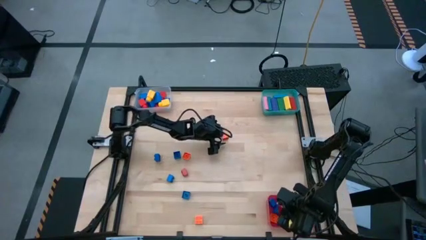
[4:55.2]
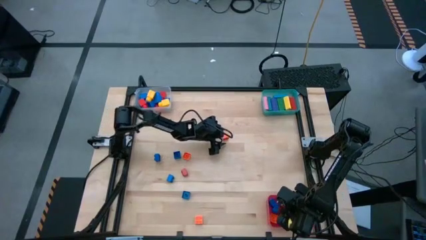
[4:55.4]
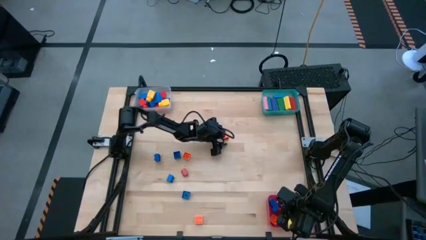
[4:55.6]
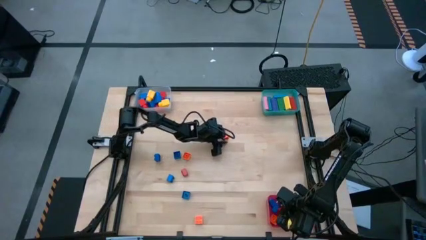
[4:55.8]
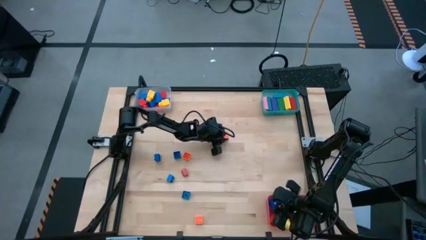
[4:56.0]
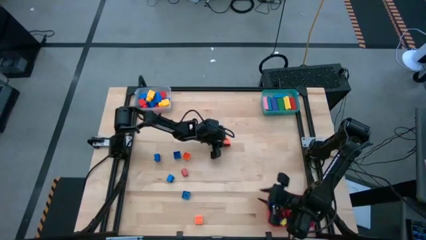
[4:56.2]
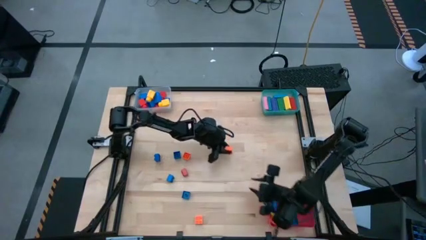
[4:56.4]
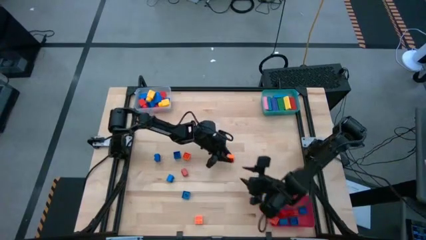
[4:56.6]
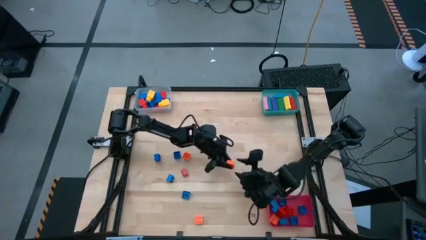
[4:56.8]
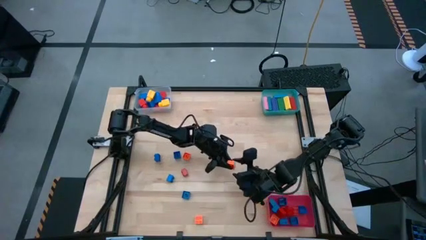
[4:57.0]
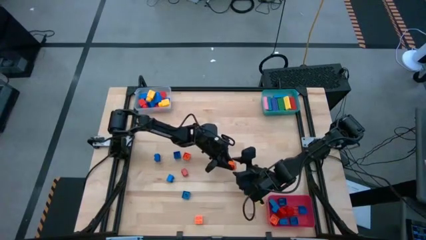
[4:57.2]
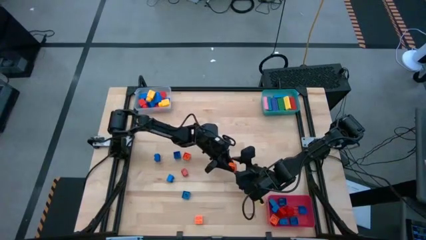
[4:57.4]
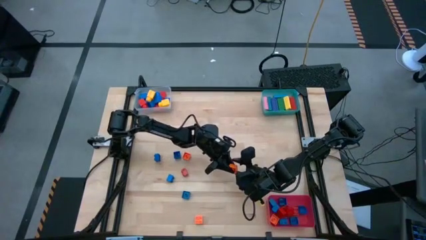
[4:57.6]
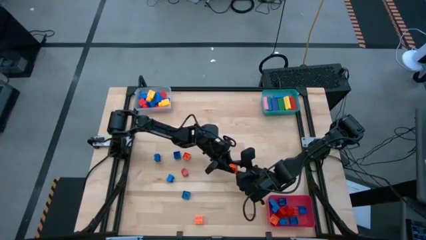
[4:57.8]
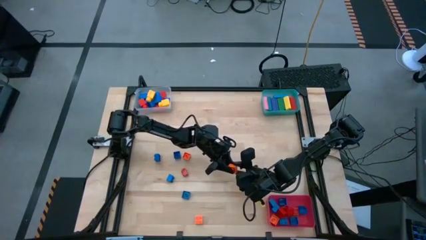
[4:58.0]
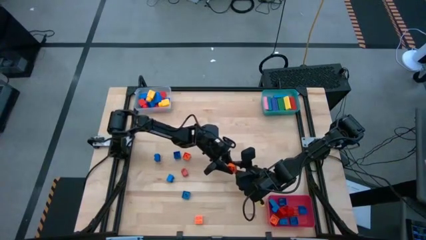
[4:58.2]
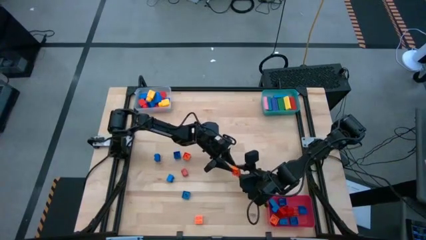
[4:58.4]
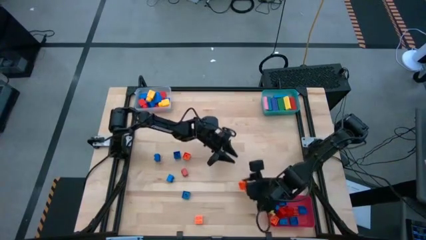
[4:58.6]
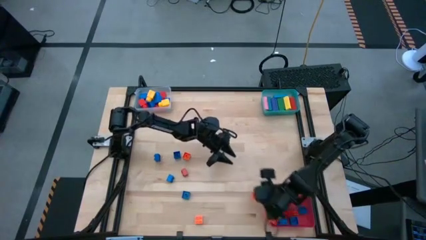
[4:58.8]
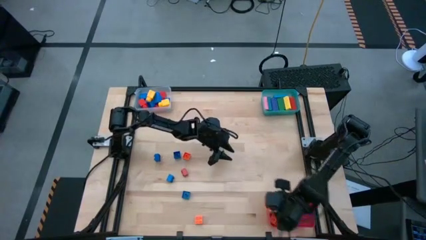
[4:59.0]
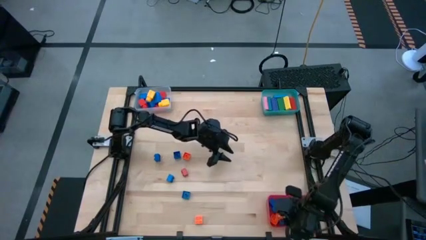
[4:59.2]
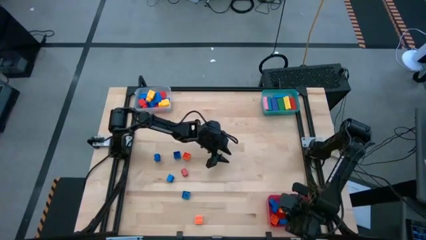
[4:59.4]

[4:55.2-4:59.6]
Task: Sort blocks by size
Put the small blue game piece into the red bin

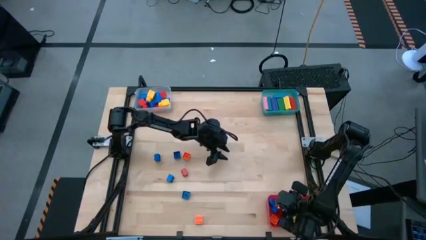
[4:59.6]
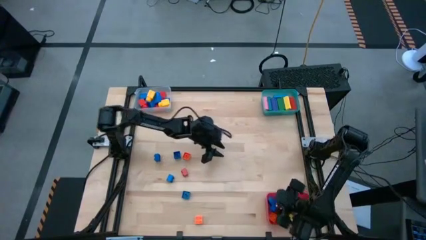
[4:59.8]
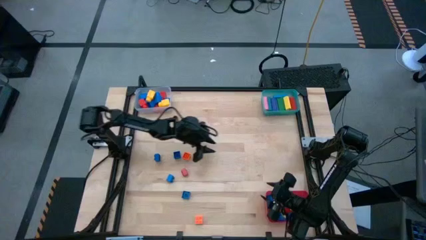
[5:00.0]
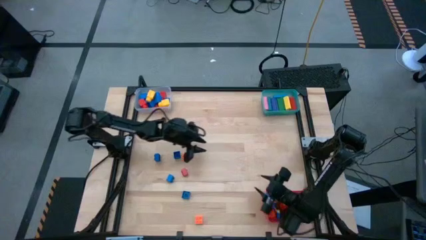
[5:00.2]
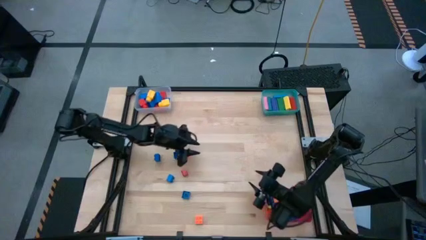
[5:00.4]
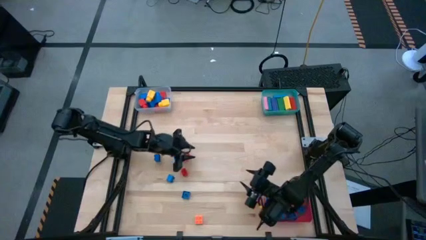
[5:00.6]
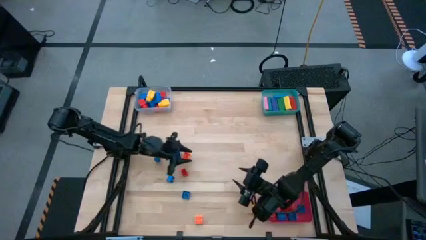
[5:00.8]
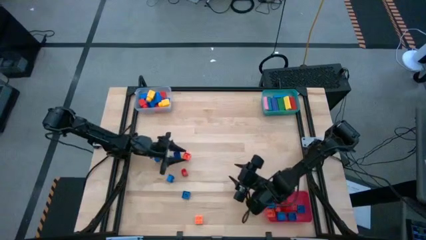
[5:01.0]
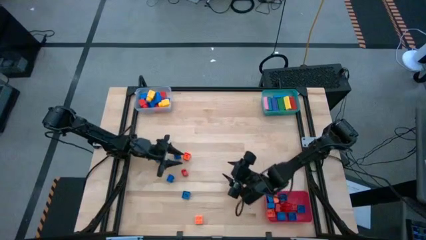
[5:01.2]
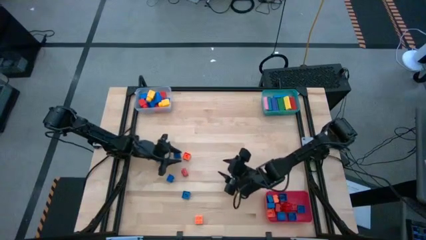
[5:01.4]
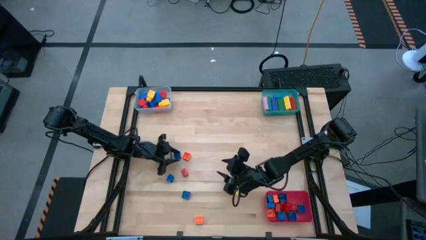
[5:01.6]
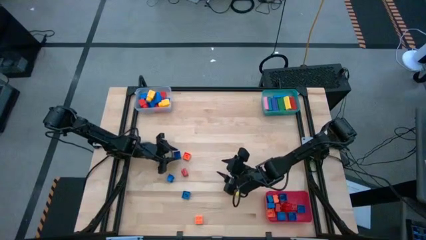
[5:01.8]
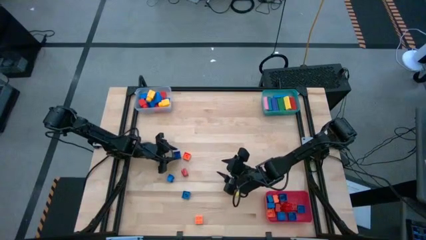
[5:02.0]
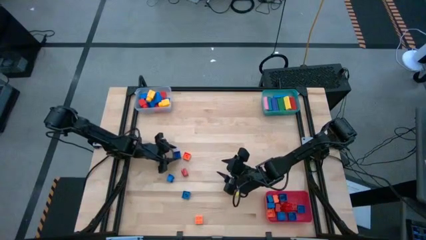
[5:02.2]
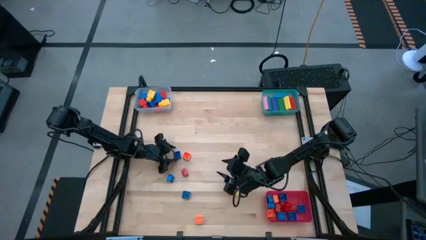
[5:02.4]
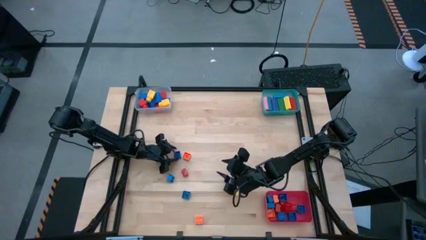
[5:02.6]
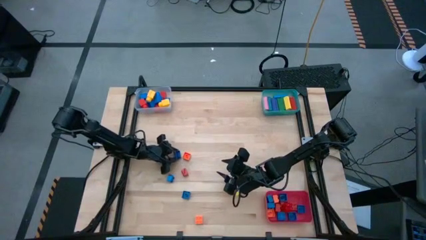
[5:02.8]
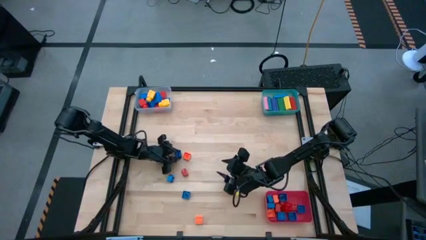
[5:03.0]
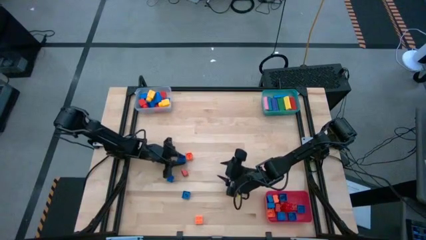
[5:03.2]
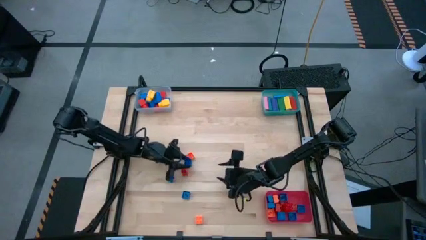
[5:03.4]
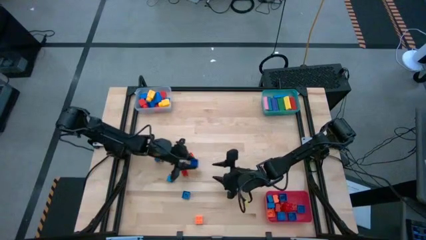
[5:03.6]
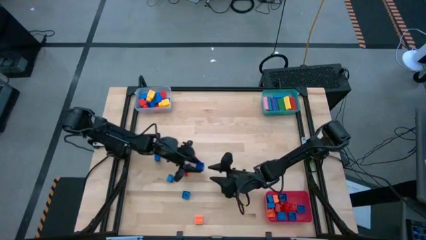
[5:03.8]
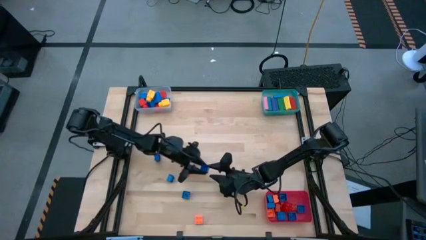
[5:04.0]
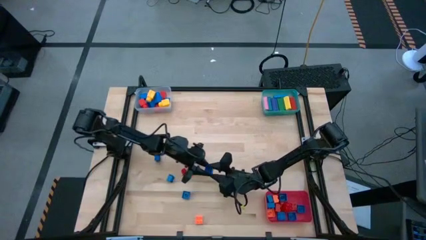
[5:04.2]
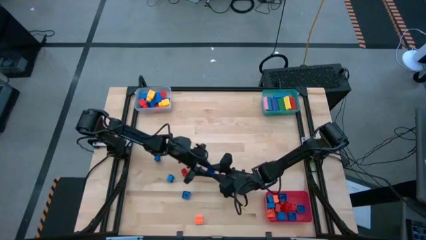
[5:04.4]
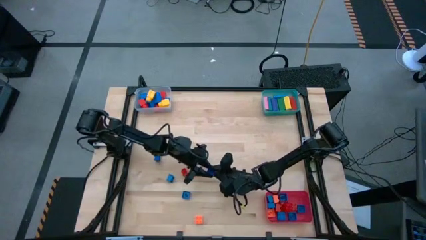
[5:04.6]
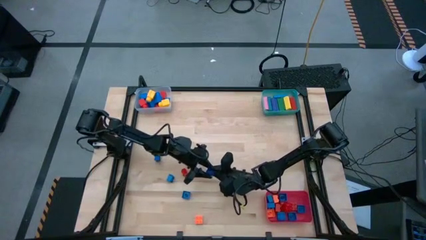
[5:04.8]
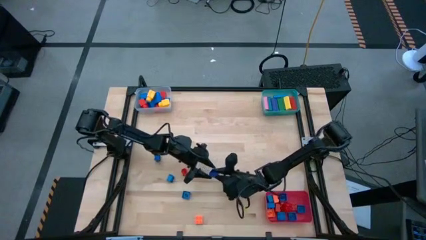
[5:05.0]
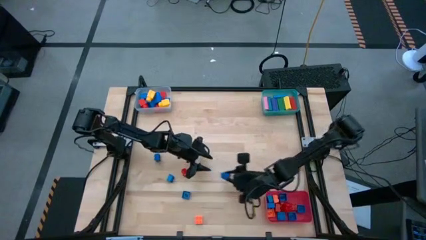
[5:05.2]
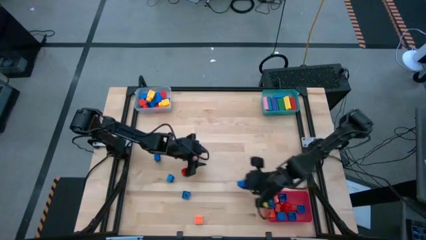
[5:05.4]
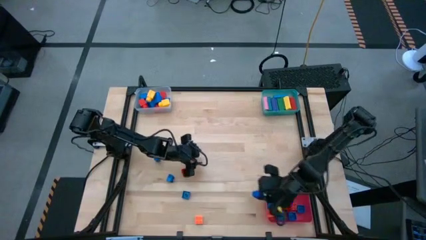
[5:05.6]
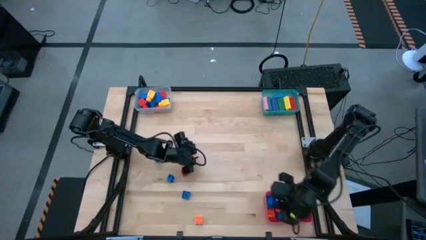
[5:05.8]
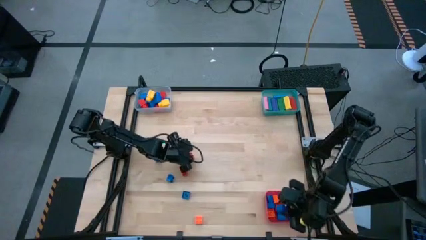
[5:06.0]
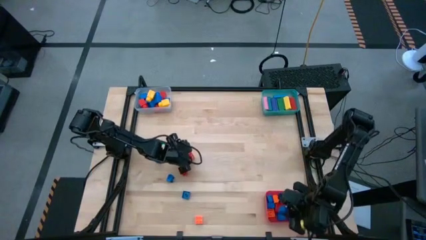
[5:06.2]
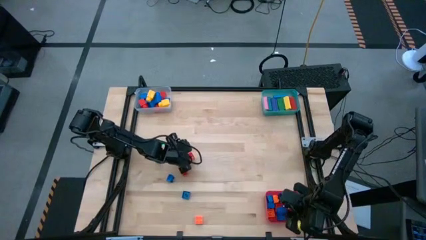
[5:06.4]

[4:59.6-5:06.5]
Put the small blue game piece into the red bin

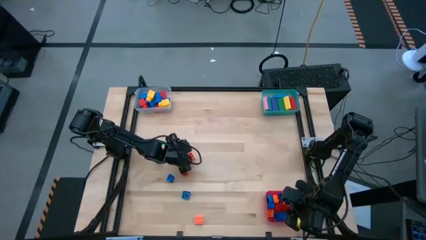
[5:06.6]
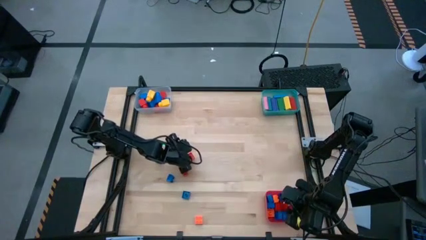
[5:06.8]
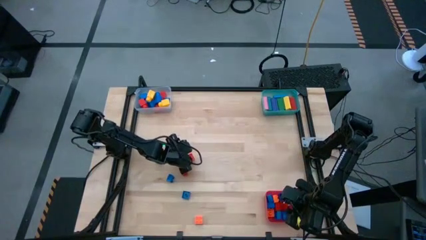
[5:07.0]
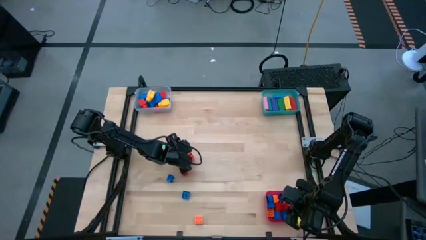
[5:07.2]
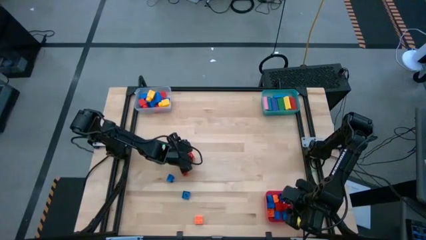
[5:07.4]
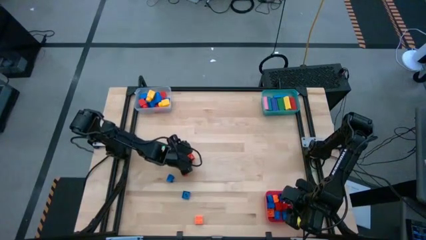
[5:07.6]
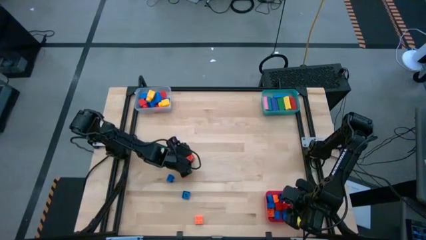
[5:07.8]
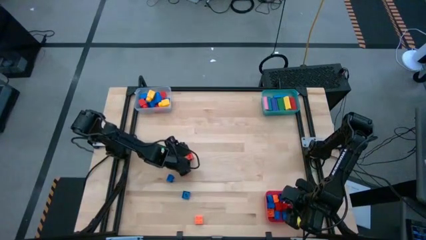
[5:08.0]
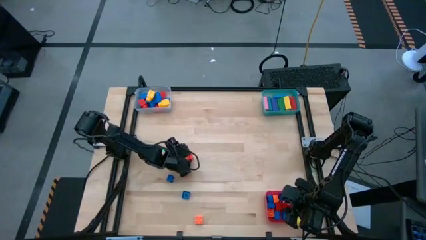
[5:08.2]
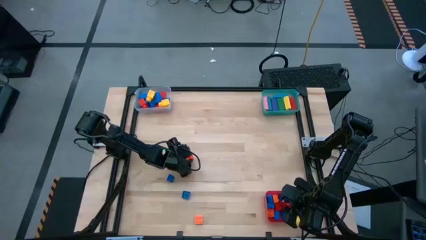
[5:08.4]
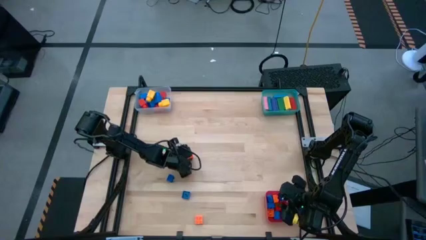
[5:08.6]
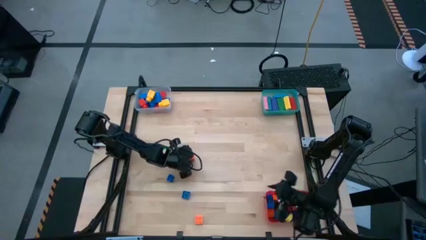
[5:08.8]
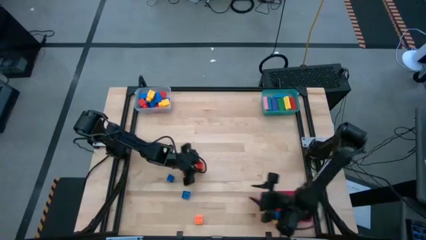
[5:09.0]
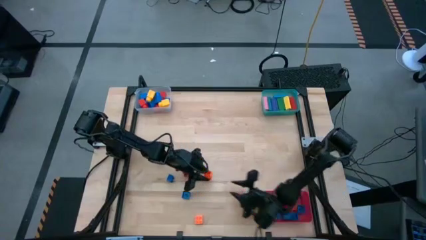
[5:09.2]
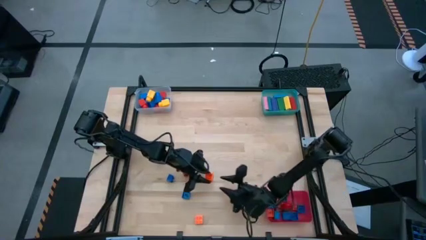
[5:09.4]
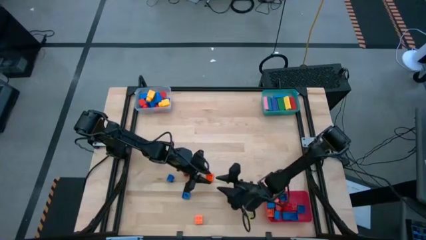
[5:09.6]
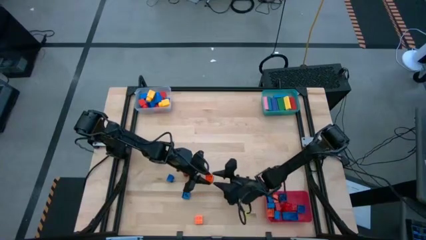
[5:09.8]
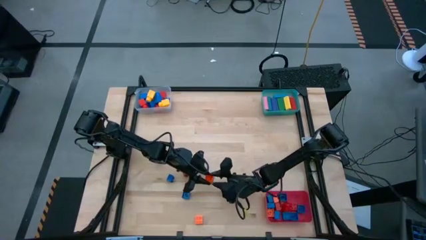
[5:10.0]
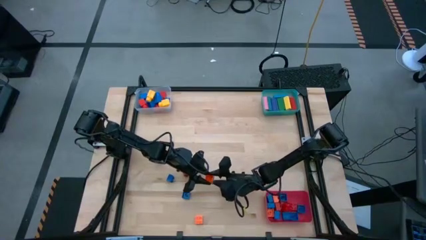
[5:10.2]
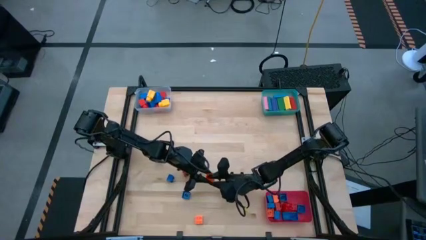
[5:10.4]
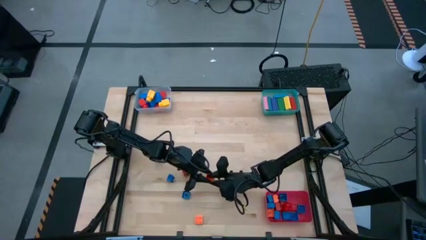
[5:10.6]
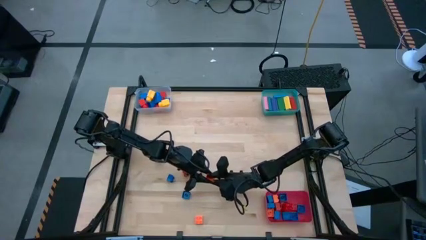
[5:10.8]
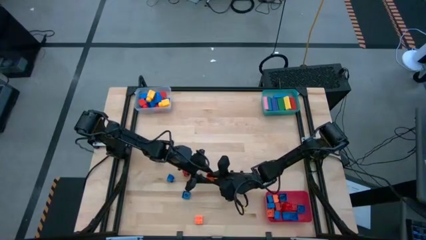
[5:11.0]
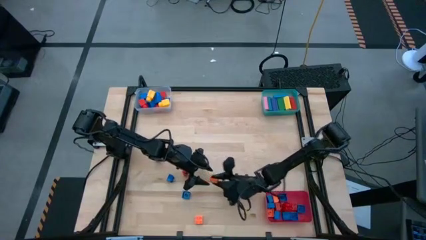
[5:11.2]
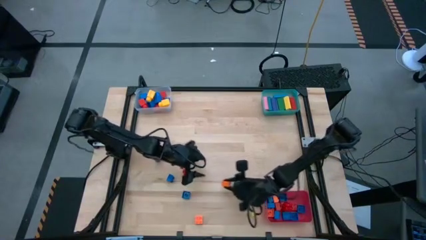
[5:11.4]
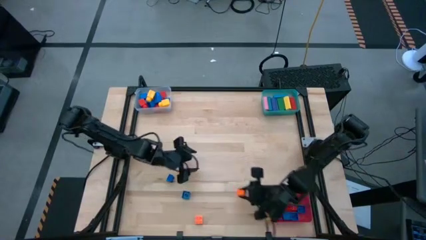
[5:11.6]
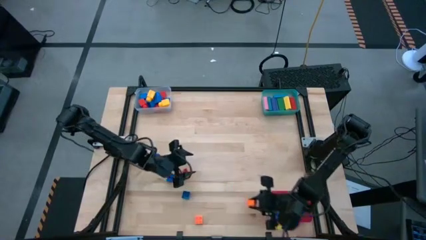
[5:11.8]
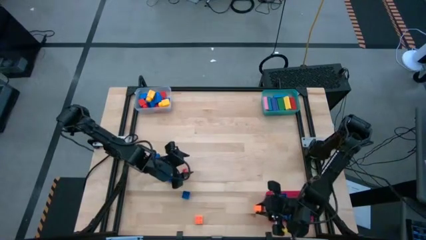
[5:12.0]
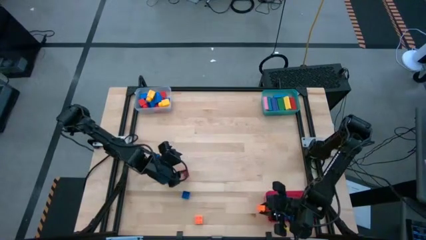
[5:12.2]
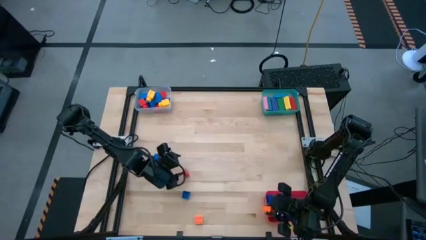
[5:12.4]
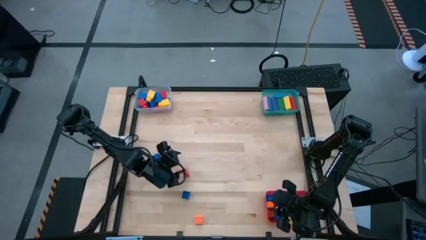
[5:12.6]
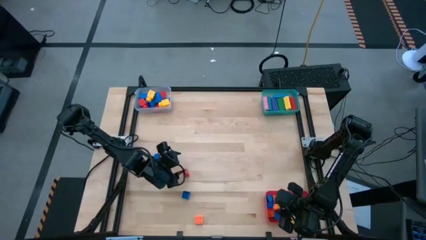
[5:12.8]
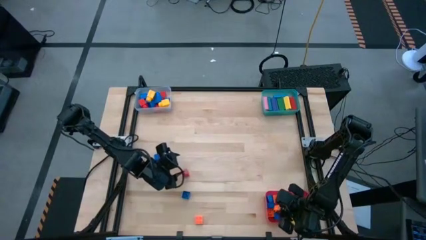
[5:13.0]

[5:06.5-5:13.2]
Put the small orange game piece into the red bin
